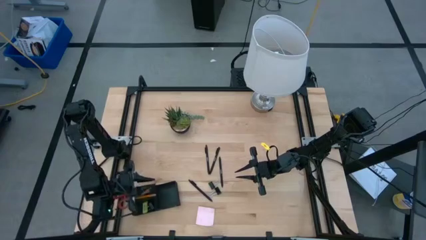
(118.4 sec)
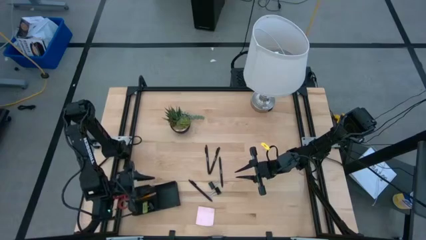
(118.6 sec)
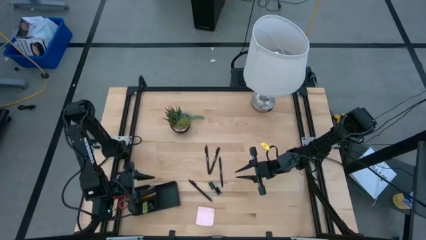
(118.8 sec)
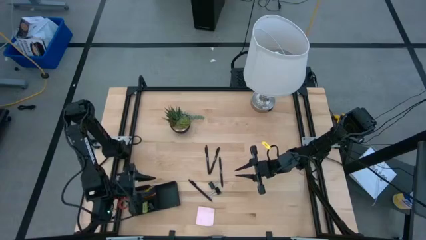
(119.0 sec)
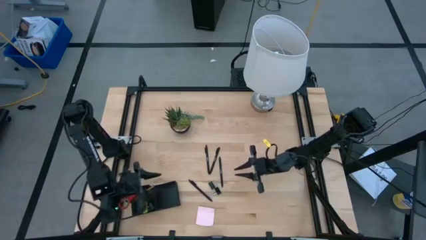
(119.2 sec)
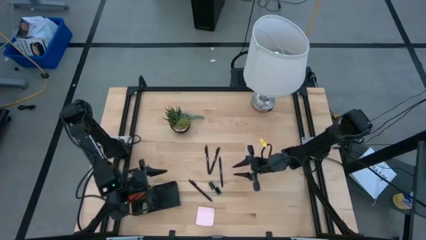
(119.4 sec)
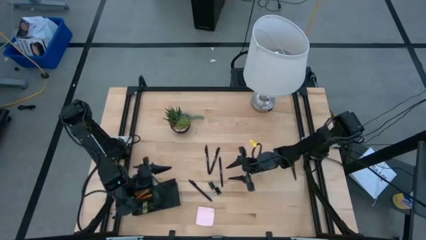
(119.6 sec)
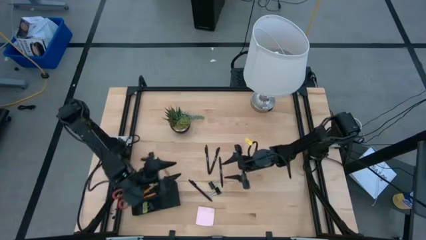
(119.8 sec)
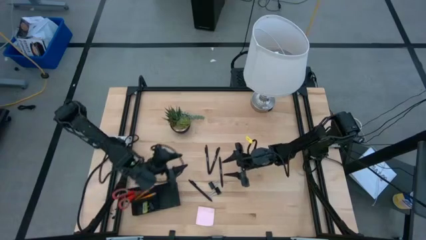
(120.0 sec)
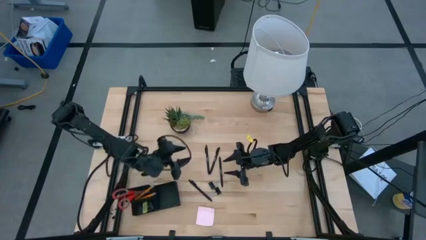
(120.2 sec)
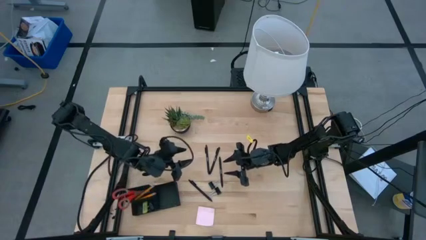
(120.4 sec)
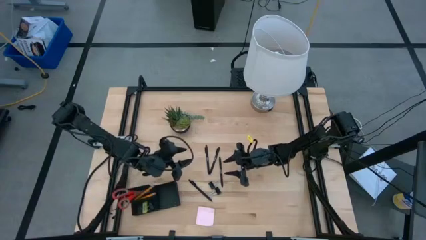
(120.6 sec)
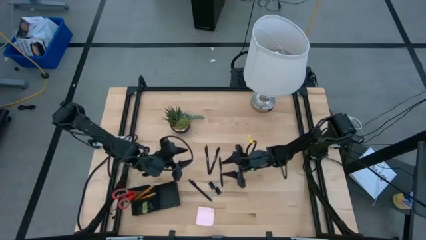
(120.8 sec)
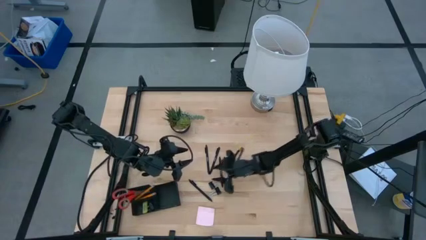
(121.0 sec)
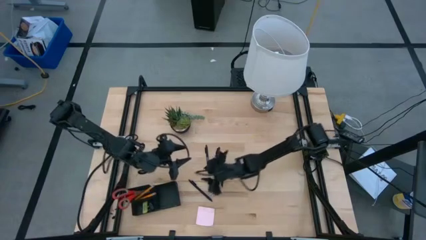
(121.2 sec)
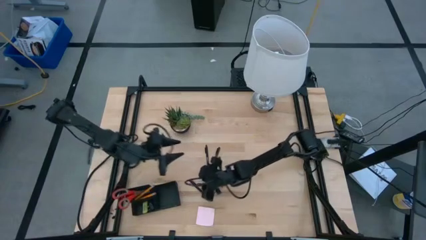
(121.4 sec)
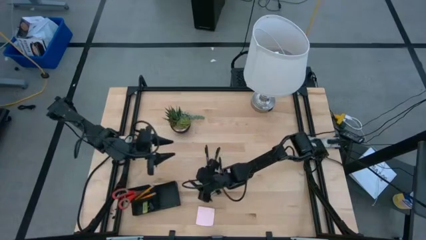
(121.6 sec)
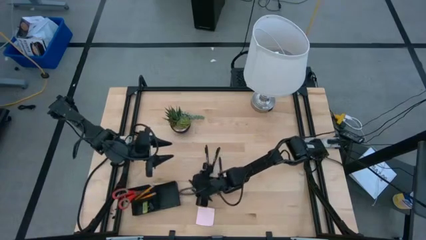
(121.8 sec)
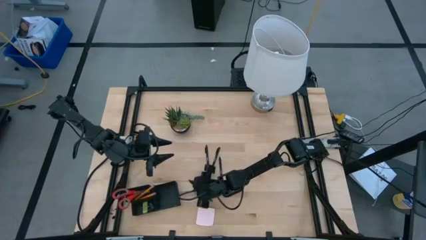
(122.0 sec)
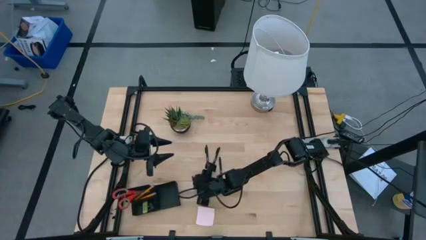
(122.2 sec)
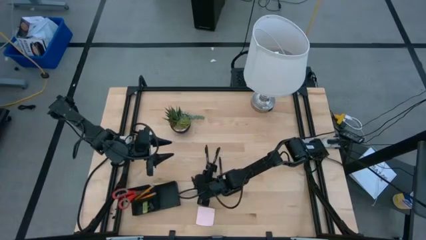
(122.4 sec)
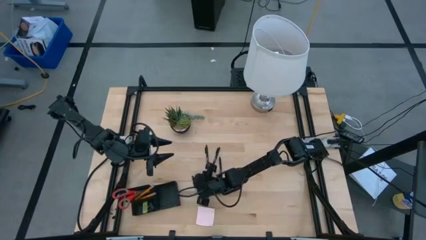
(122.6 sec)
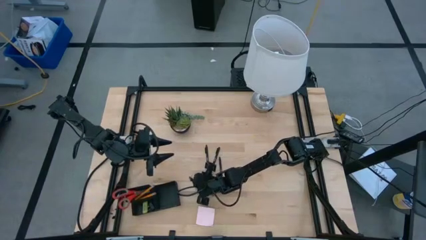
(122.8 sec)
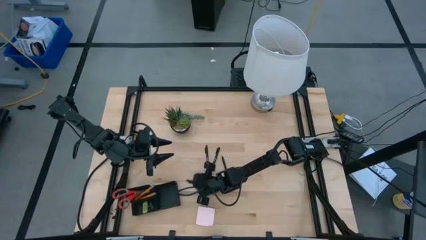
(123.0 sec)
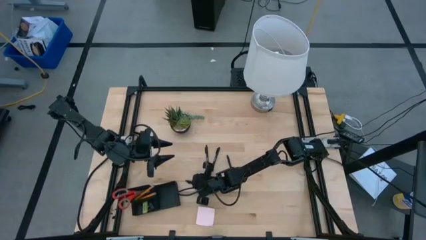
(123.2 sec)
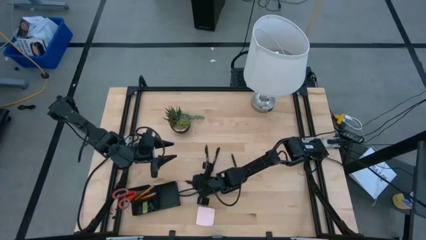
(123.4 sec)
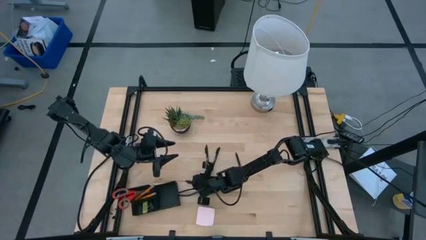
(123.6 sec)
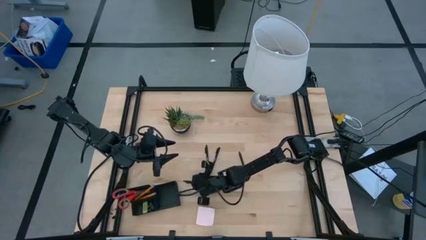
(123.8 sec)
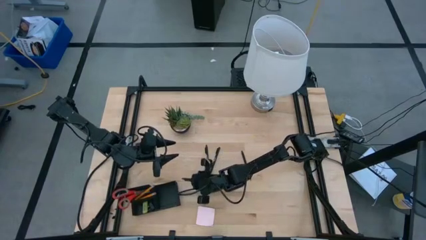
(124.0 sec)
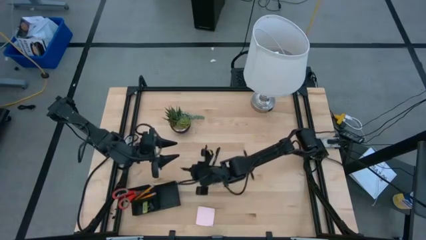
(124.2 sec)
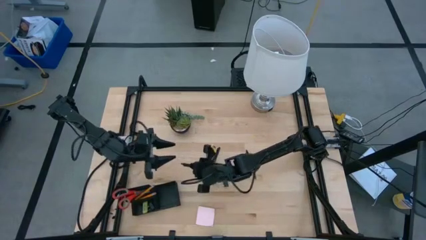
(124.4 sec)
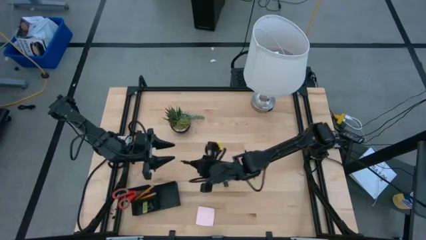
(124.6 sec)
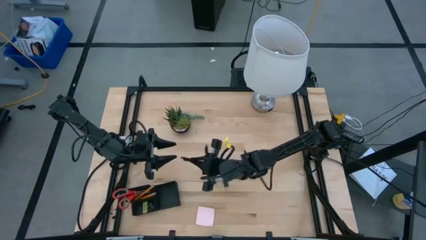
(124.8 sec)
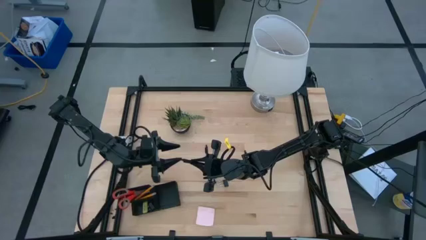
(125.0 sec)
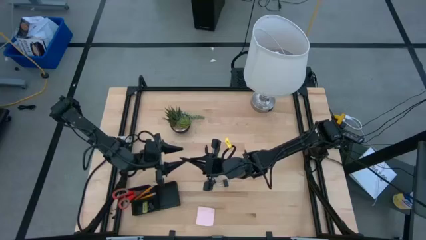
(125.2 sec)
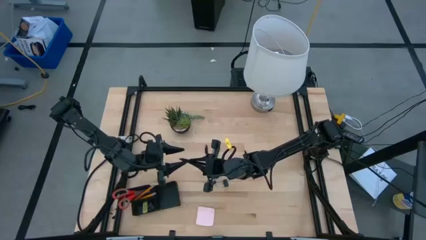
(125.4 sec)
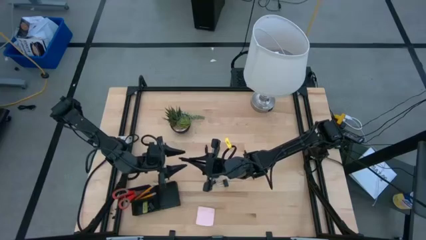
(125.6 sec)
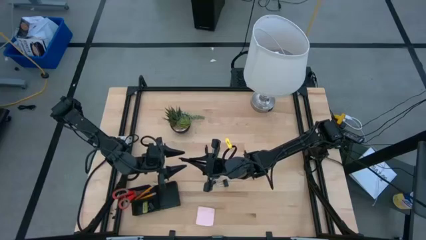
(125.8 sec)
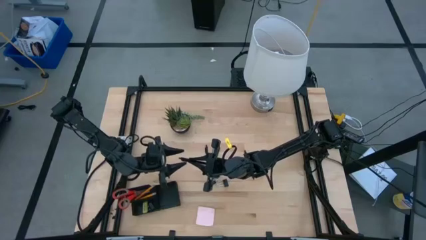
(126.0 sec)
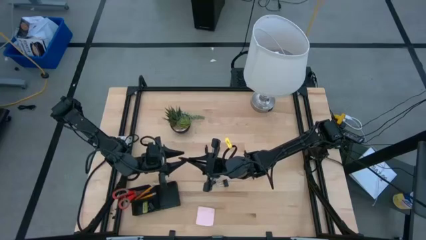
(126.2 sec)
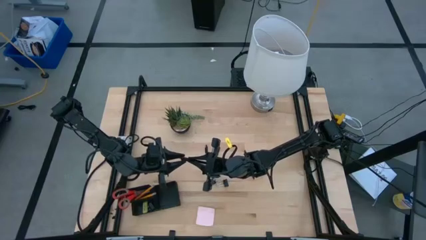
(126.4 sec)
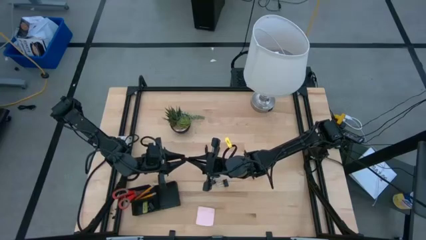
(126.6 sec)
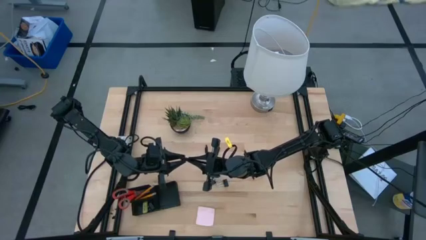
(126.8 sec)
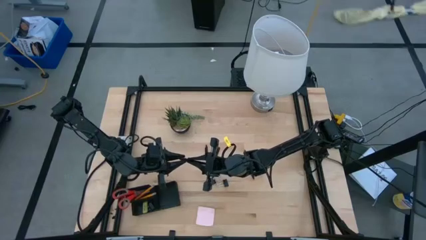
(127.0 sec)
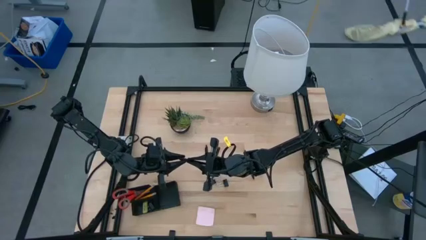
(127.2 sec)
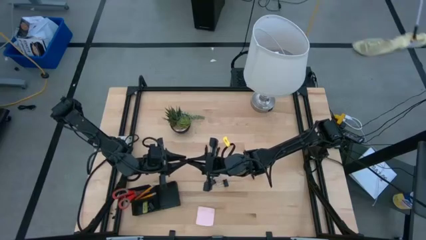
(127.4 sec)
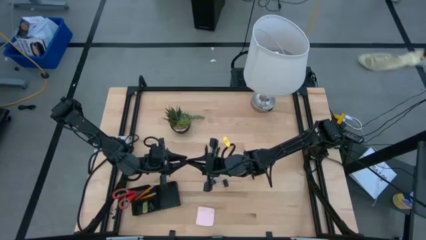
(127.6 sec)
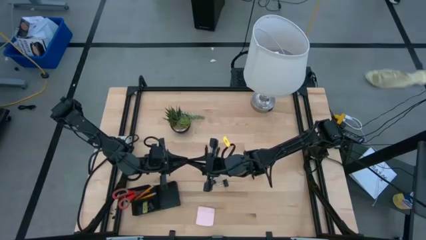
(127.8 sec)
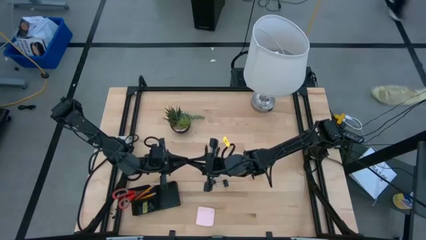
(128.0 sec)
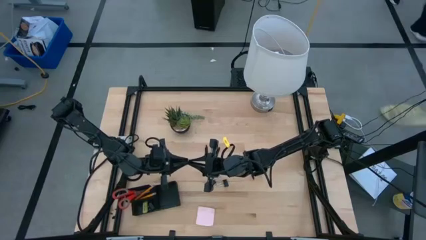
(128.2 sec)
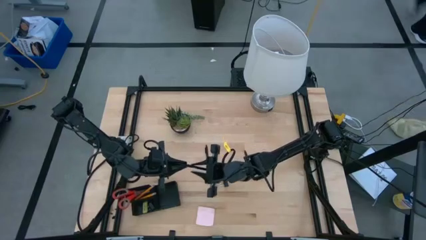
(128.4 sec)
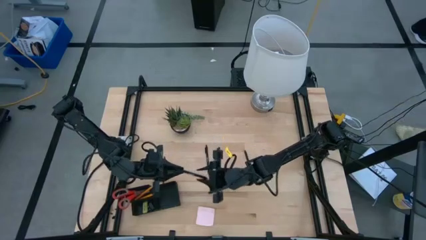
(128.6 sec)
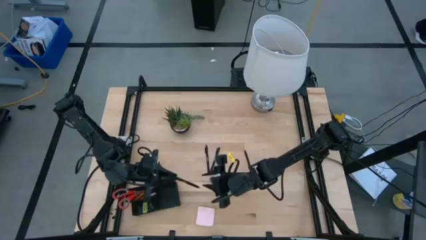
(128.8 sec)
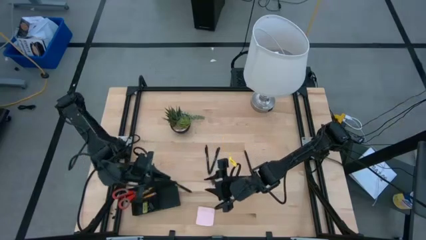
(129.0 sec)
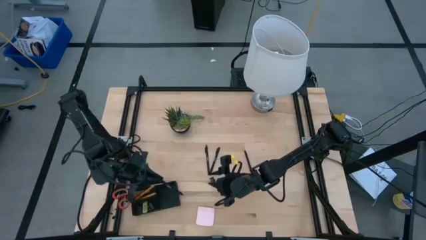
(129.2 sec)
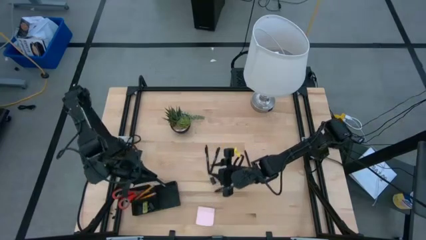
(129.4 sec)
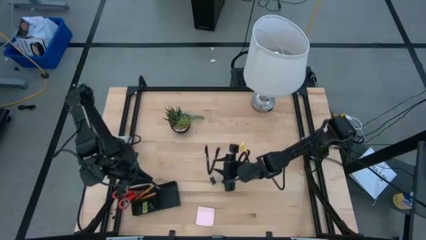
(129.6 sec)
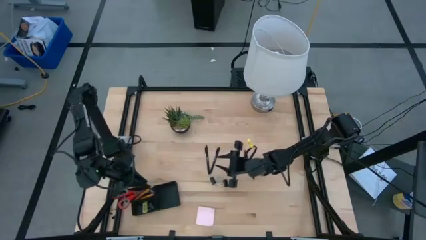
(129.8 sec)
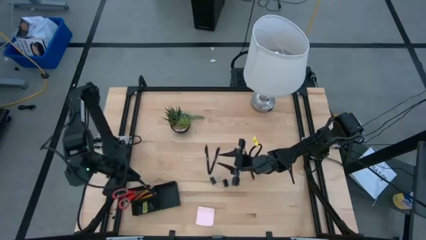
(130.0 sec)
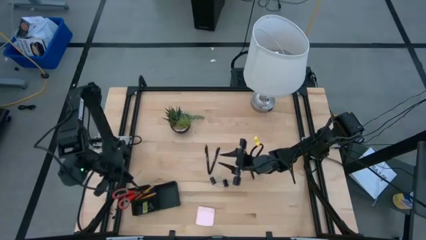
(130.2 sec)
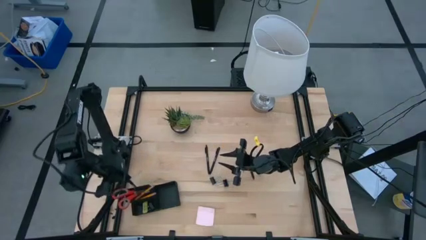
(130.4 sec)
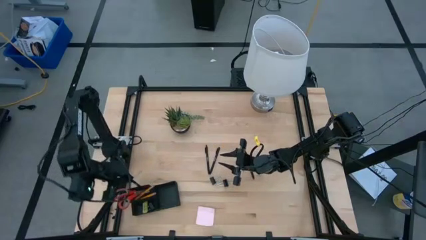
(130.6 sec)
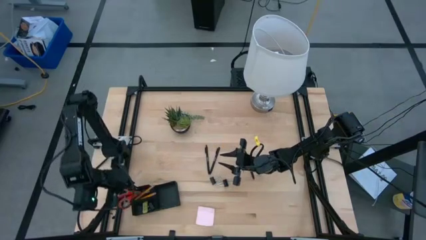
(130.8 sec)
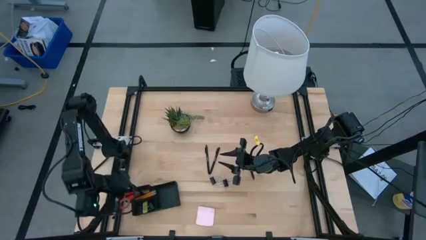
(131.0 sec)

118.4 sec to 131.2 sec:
Task: Pick and place office supplies into organizer
Put the bottom pen into the top left section of the desk organizer

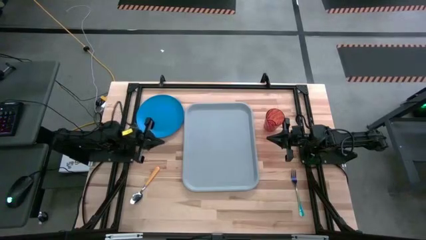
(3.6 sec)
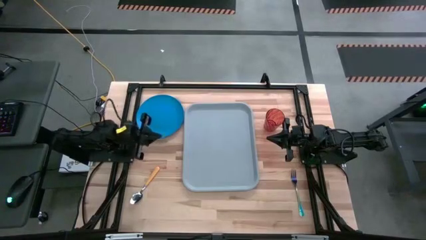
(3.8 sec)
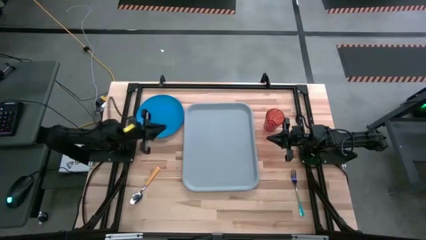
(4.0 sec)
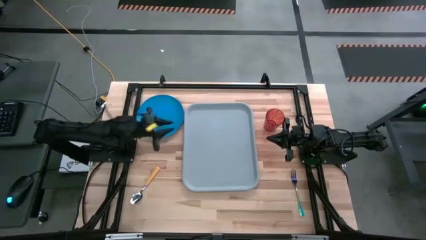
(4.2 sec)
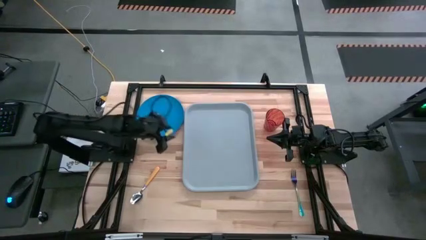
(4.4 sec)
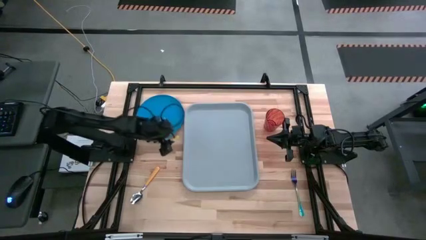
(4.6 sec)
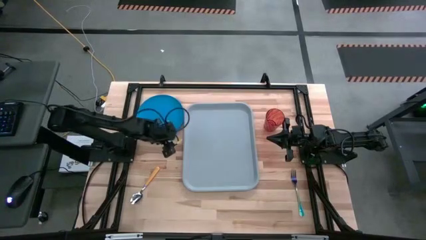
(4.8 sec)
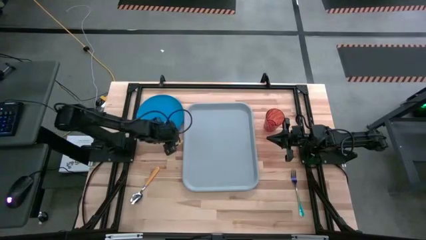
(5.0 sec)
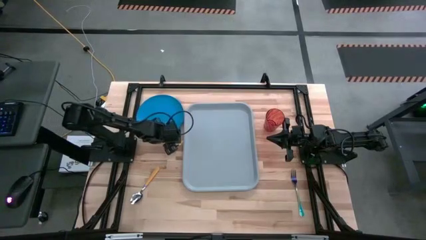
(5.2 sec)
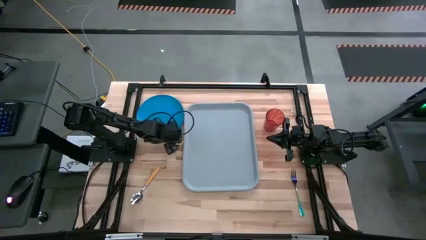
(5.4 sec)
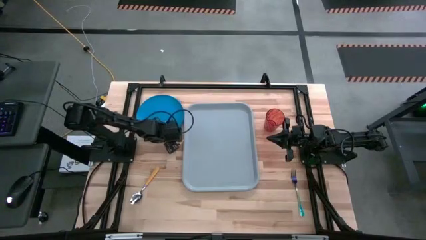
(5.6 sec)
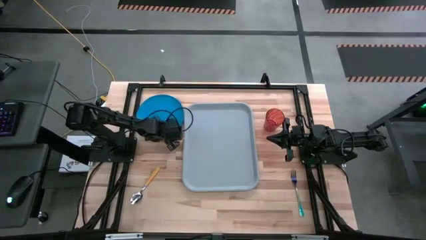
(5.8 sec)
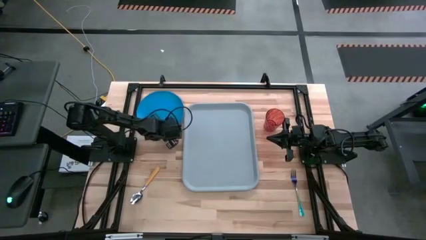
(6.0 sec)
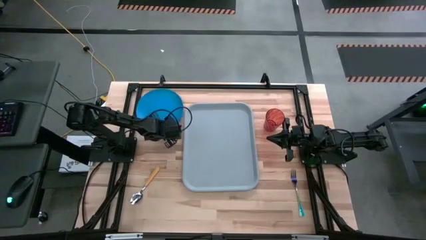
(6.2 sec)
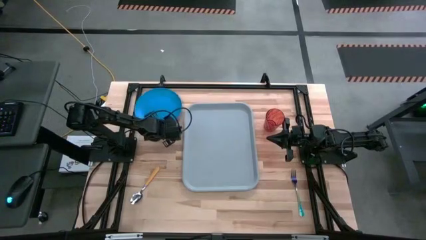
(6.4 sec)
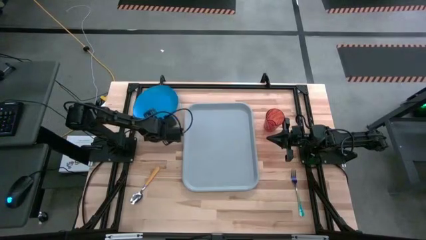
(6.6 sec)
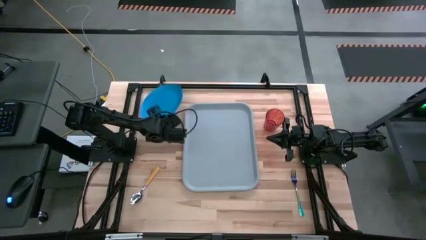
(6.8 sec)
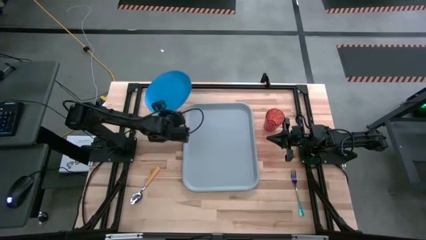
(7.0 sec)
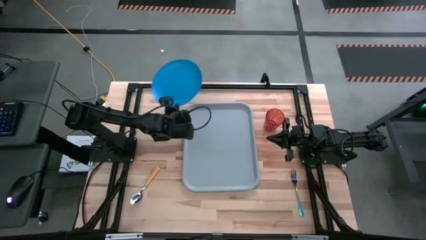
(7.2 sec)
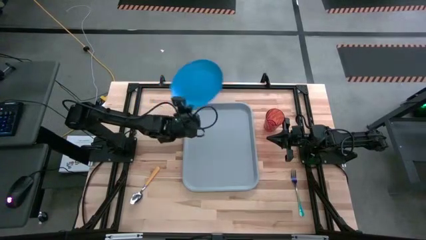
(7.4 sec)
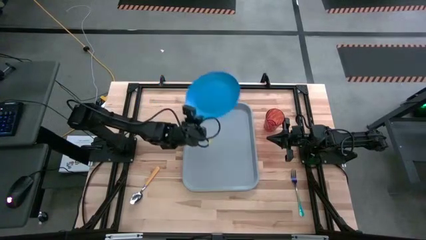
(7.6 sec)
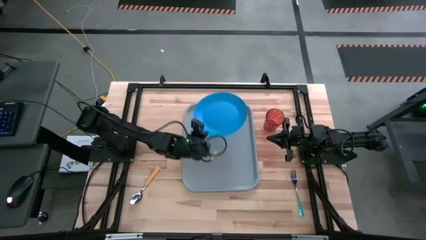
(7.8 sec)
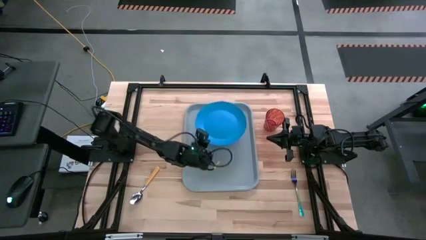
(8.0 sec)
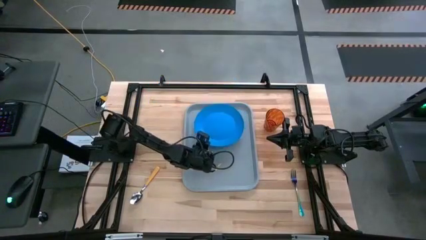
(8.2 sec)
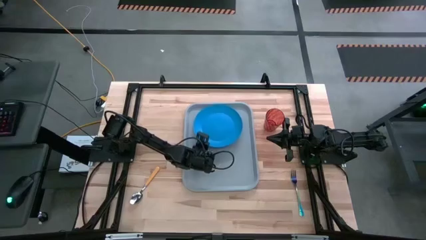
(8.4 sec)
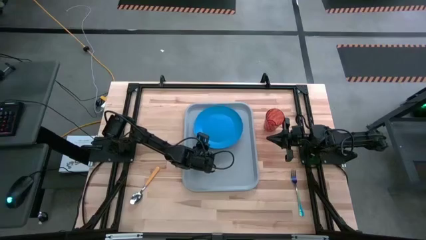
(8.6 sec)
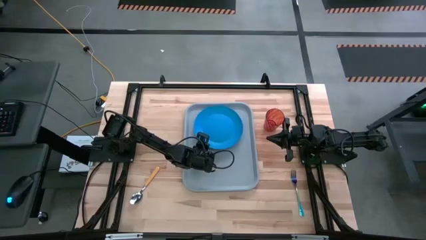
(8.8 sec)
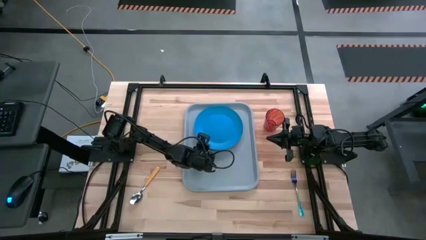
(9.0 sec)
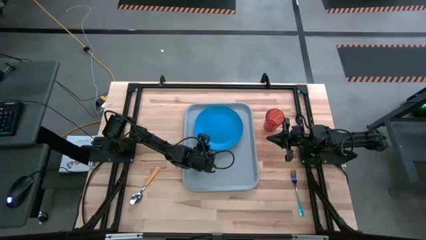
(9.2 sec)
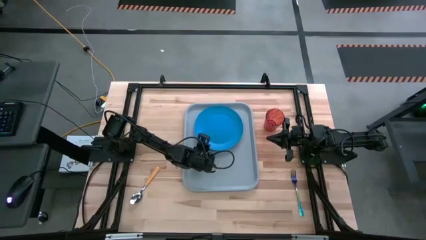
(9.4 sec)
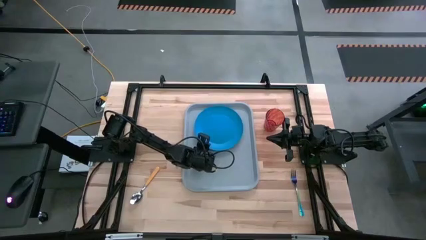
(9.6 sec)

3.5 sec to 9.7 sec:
Task: Pick and place plate/cup/fork/spoon on tray
Put the blue plate on the right of the gray serving tray
